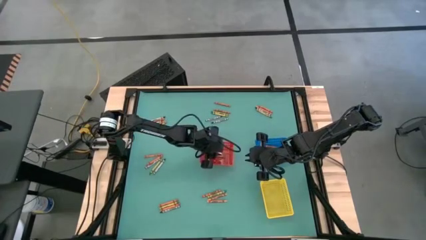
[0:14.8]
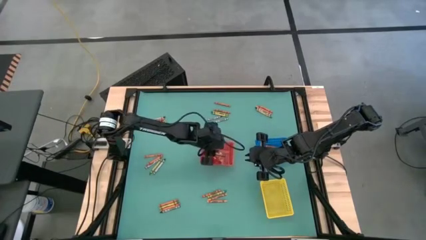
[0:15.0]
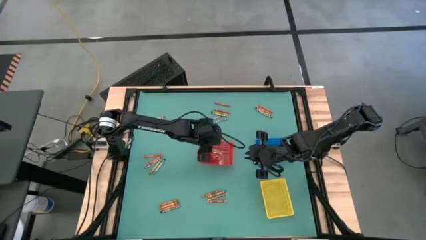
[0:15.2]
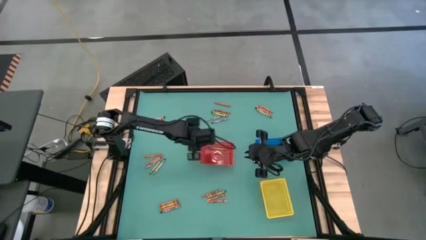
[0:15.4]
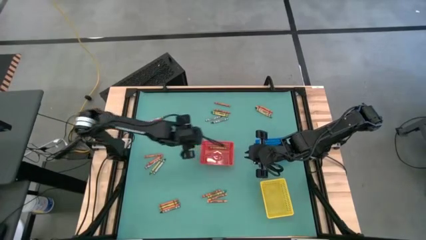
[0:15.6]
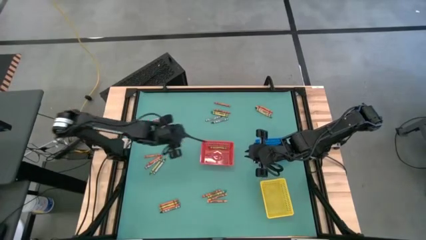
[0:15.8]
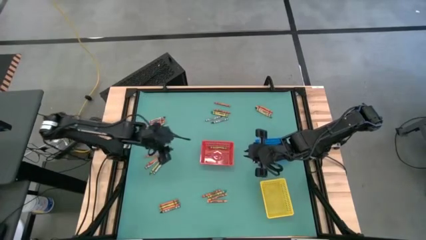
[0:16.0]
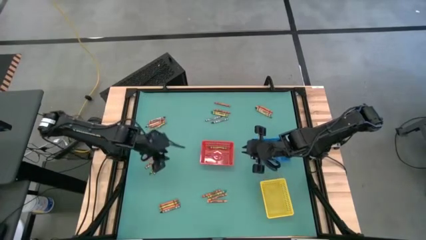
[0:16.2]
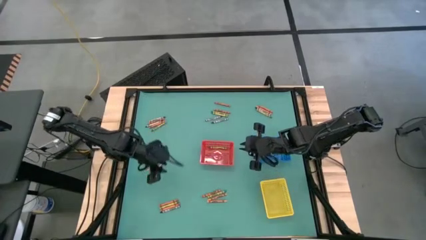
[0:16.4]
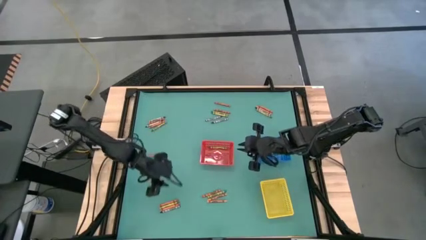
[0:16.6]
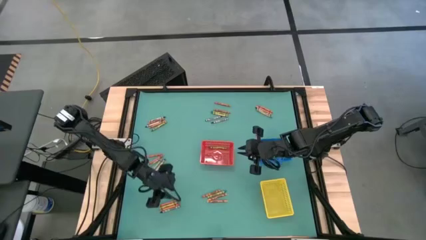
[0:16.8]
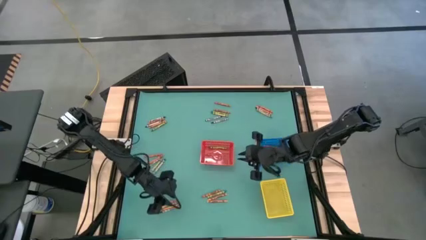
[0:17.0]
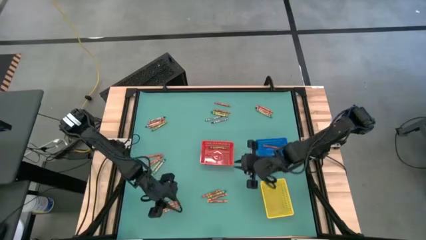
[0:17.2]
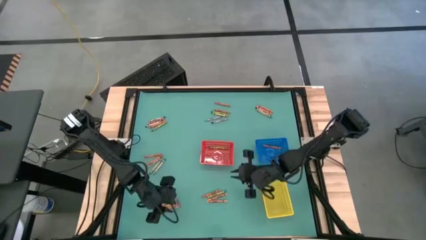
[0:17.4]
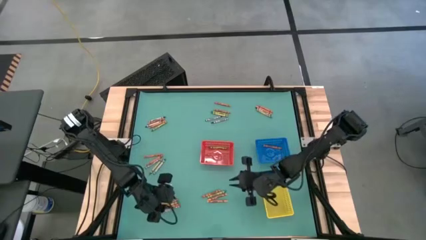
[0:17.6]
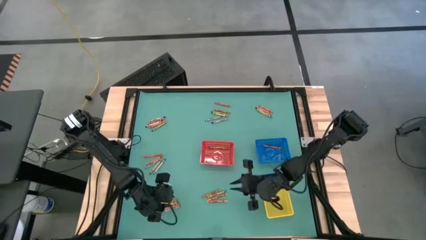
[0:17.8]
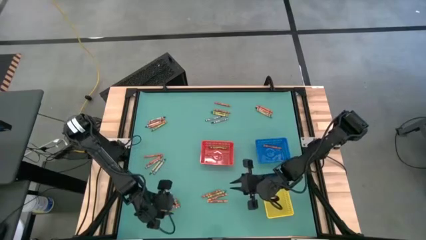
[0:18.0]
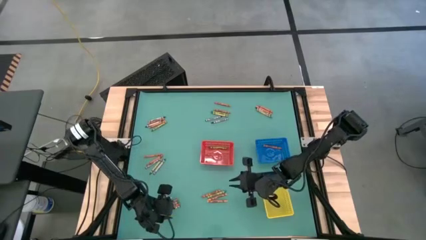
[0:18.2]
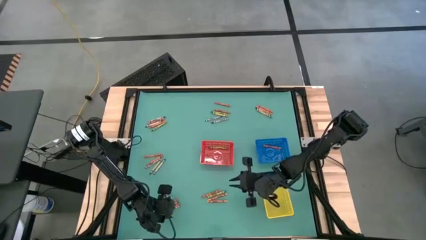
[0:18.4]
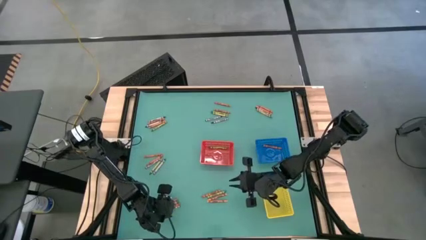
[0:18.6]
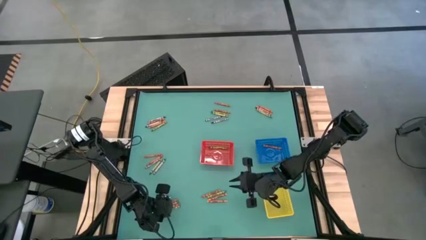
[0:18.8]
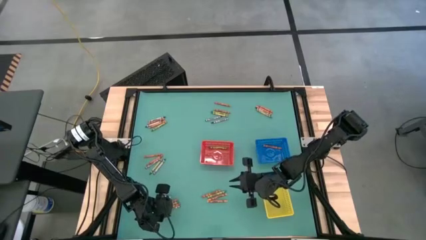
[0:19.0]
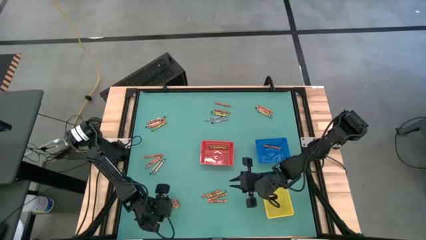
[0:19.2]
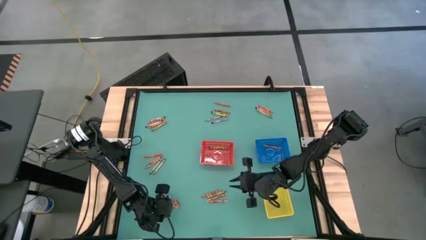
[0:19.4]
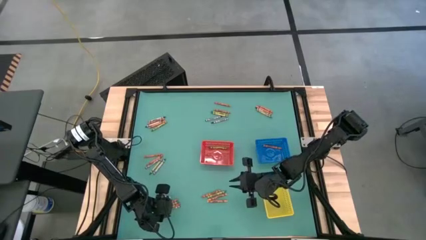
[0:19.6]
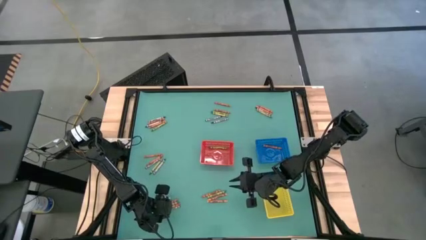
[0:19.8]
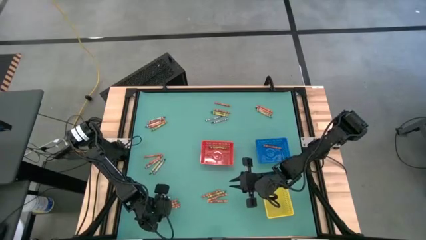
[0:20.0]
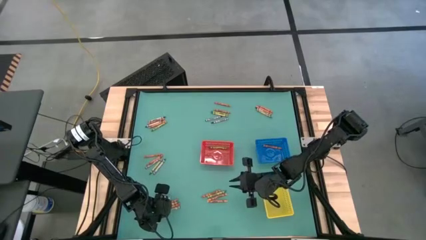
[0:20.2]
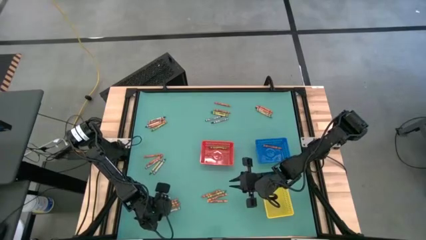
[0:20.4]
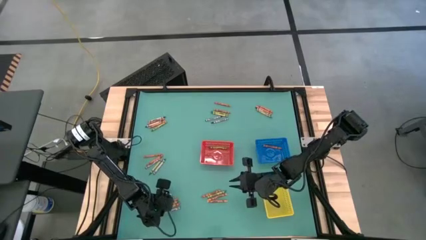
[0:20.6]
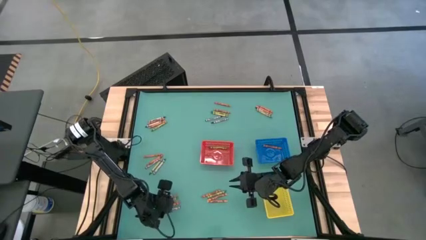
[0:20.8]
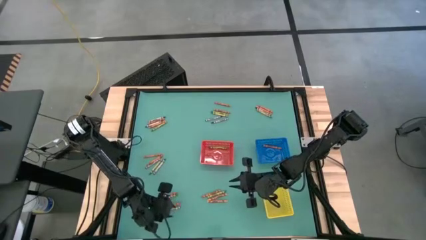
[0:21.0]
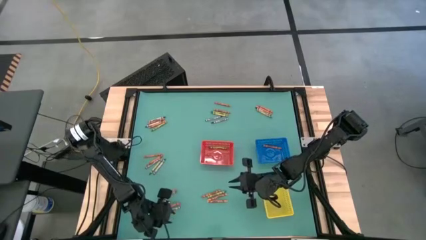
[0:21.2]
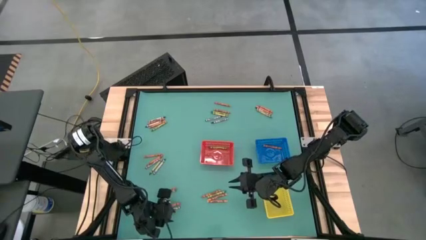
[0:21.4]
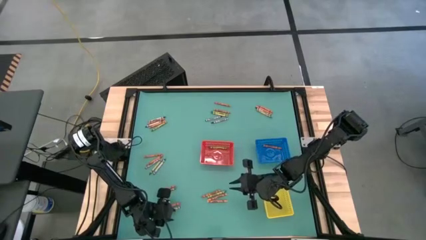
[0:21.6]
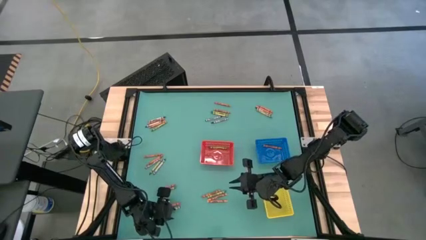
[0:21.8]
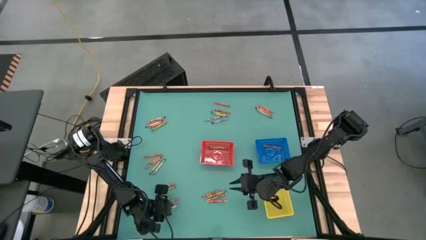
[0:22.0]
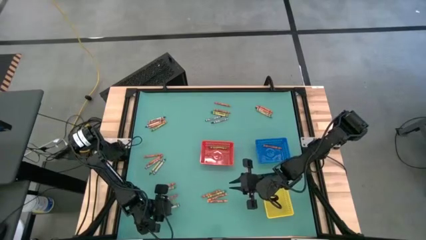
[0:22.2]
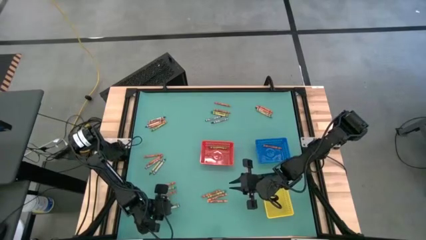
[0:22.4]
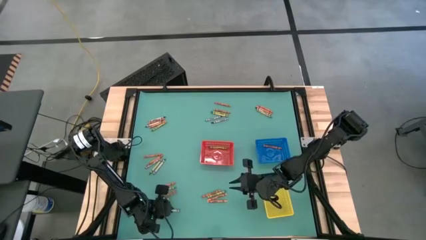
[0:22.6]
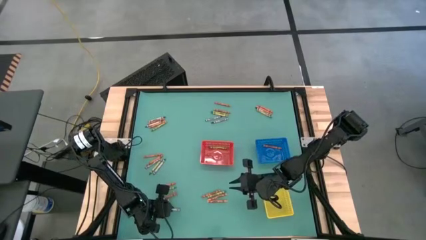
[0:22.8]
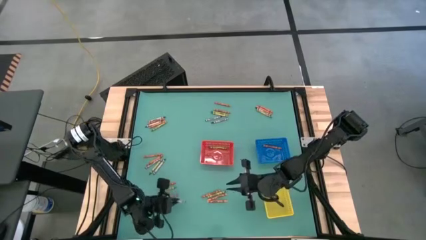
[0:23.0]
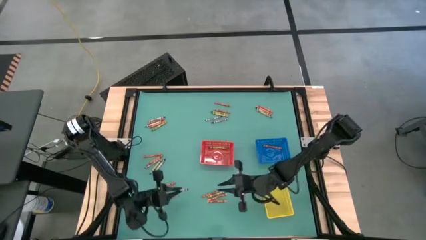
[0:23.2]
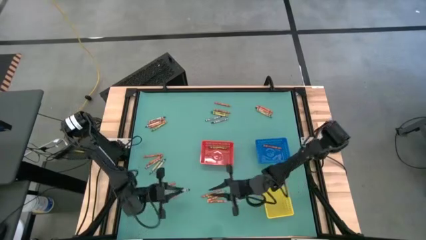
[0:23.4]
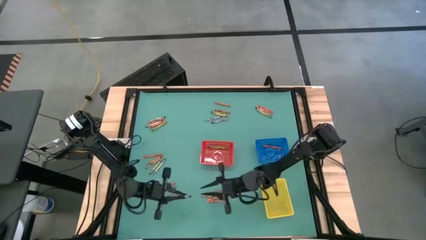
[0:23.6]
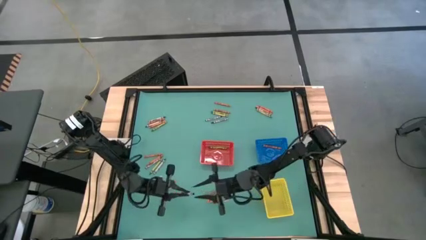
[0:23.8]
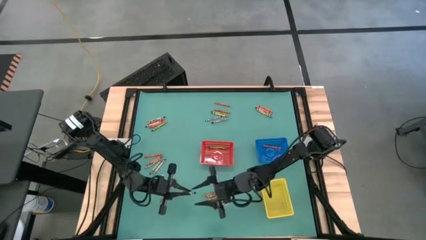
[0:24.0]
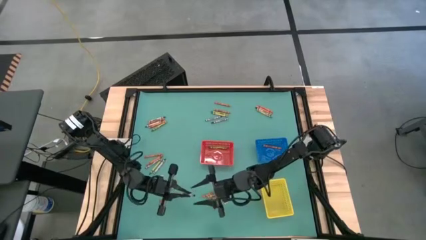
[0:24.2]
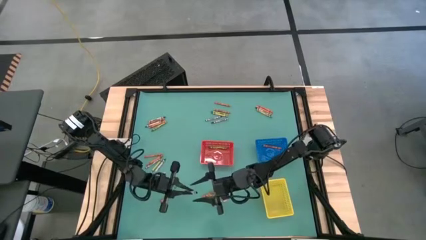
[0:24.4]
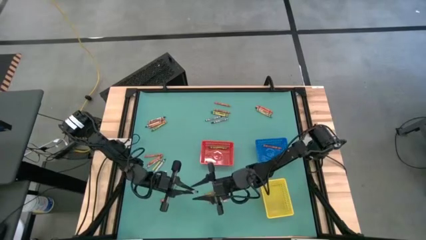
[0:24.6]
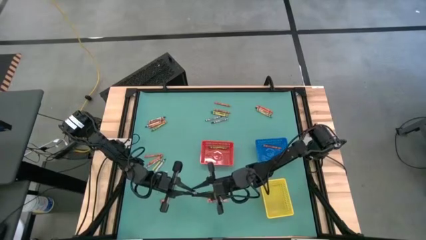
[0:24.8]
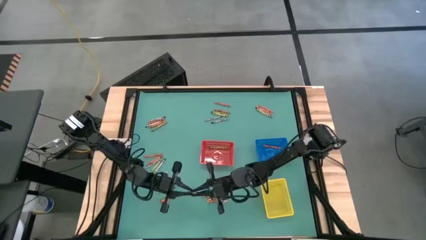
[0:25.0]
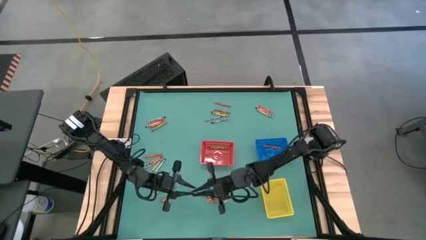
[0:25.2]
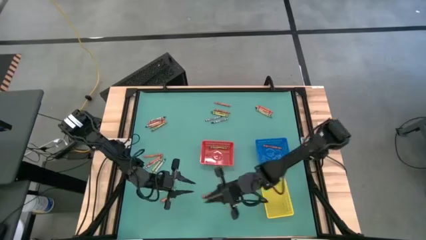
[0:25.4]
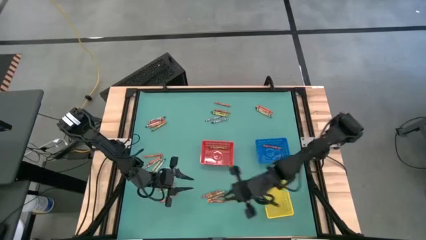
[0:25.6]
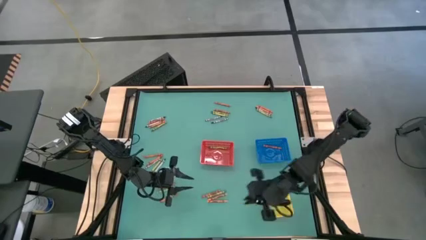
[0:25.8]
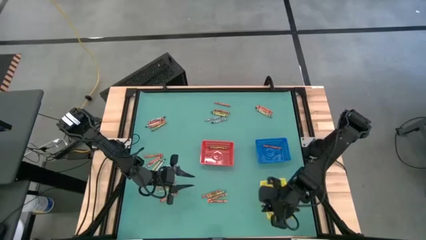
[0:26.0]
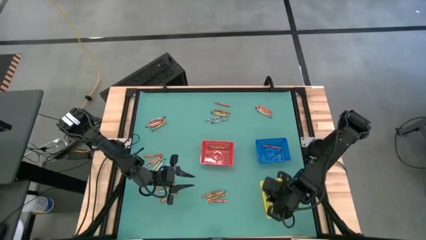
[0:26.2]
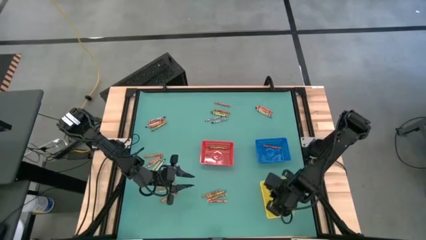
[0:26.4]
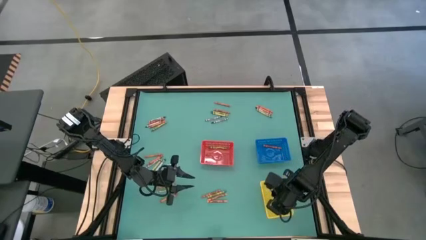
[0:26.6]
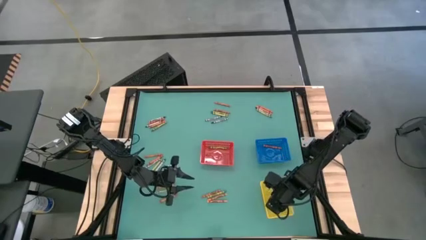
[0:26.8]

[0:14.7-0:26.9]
Task: Sort crayons
Put the black crayon into the yellow basket

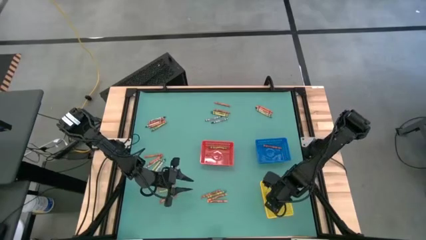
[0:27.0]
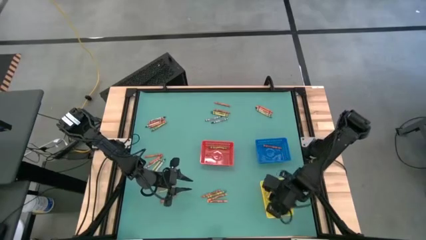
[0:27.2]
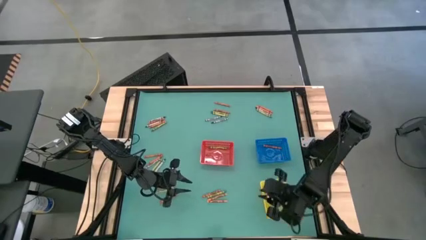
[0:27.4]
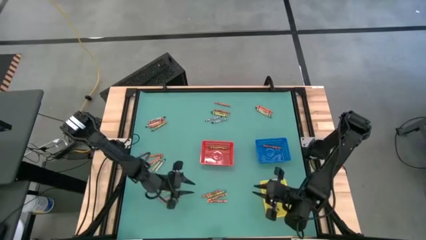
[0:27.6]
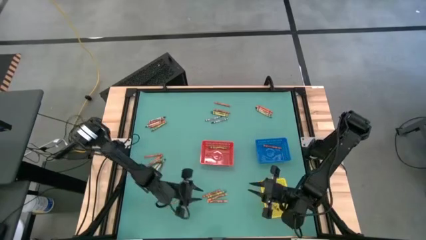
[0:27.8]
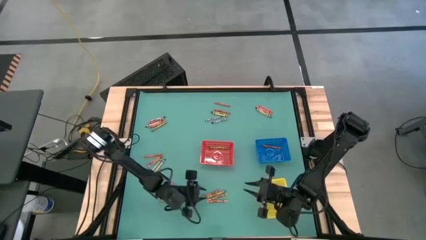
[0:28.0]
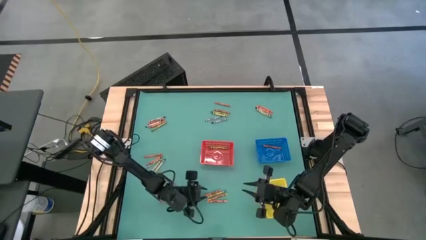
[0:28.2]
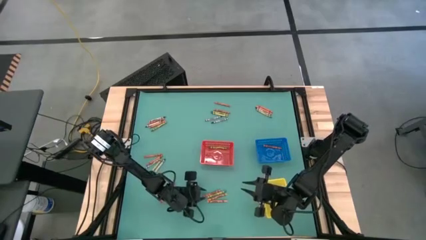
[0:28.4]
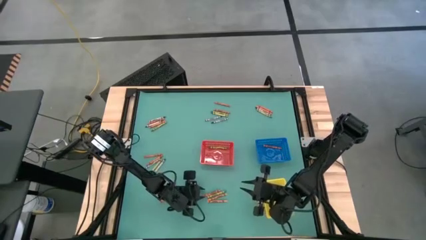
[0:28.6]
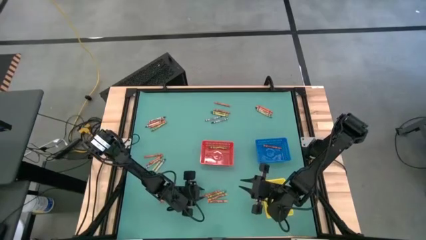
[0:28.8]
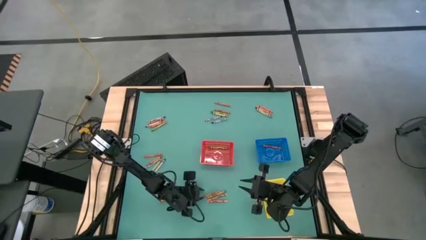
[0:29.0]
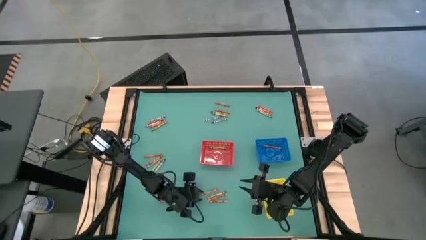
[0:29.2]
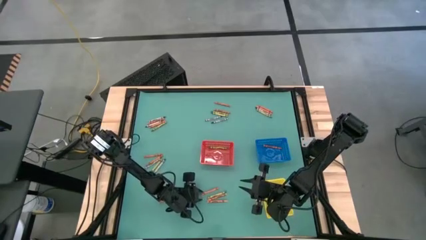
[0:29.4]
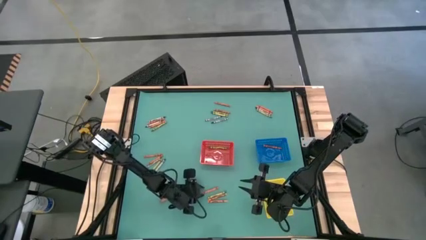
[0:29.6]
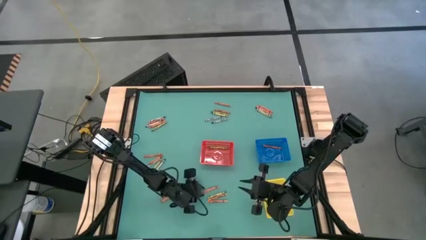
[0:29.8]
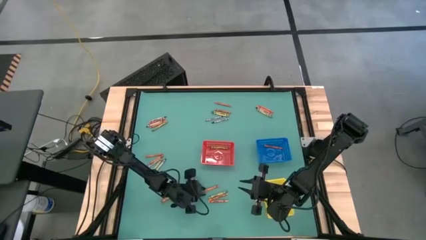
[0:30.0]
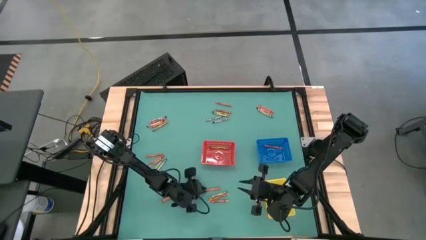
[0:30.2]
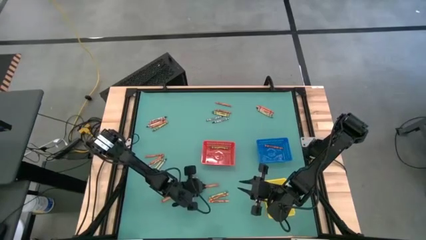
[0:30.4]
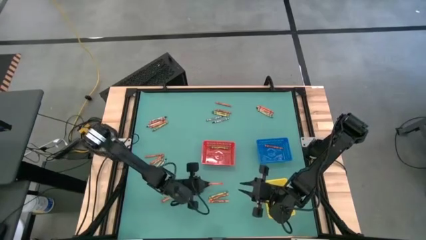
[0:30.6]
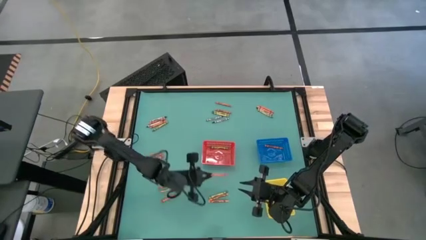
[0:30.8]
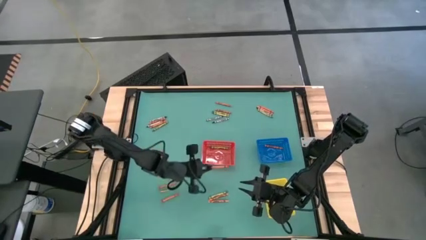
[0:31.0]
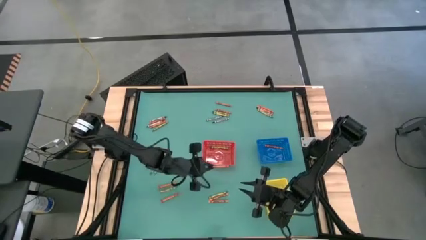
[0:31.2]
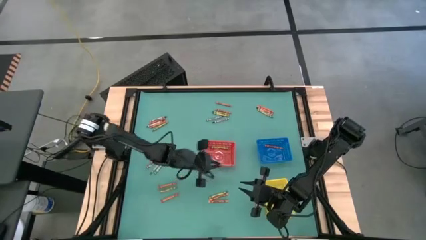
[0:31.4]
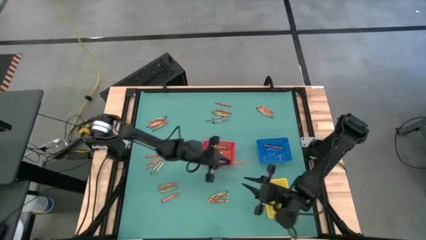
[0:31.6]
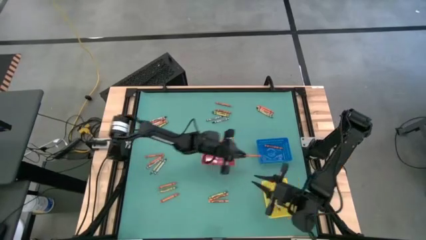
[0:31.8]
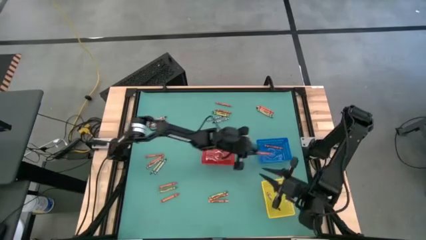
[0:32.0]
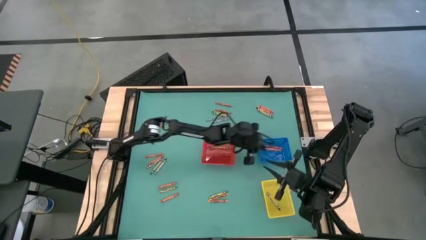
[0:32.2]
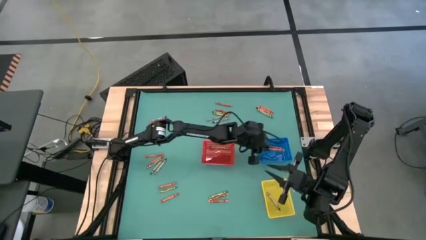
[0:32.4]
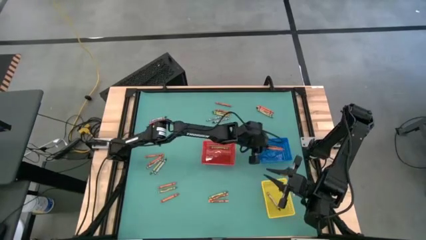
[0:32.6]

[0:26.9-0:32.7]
Put the orange crayon into the blue basket
